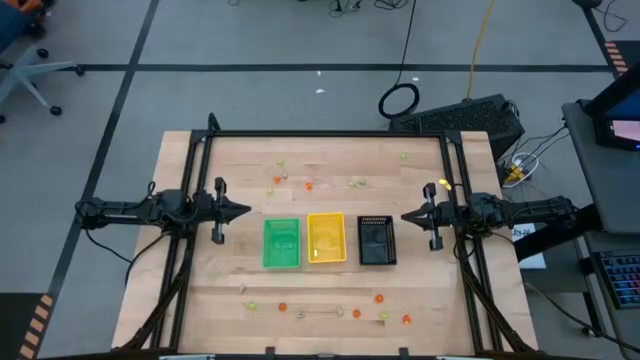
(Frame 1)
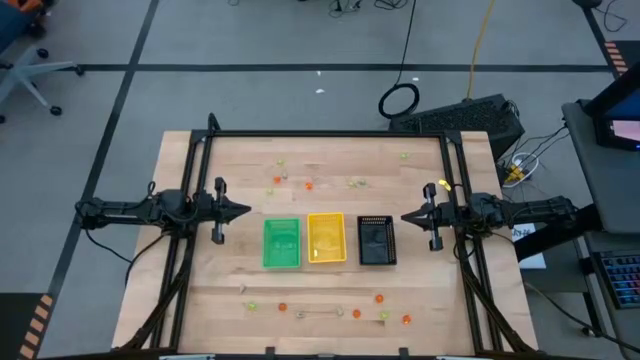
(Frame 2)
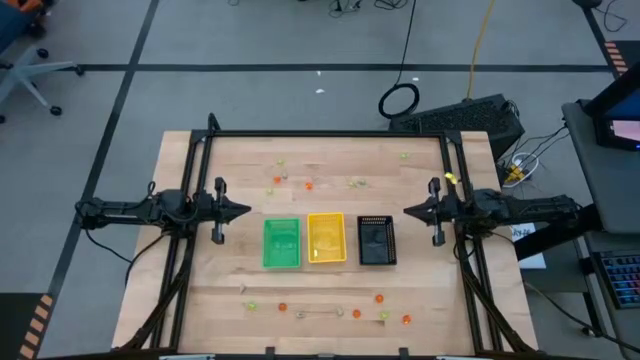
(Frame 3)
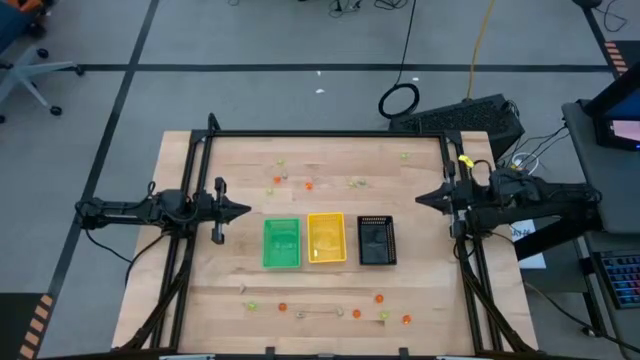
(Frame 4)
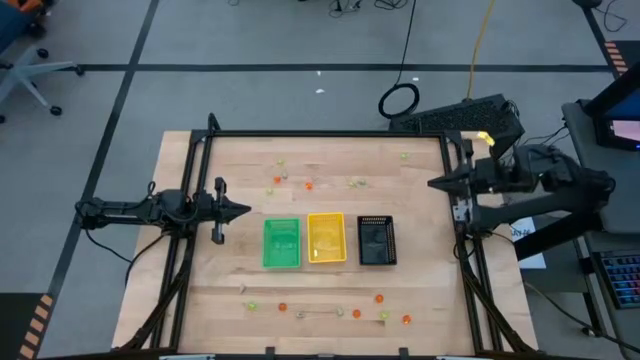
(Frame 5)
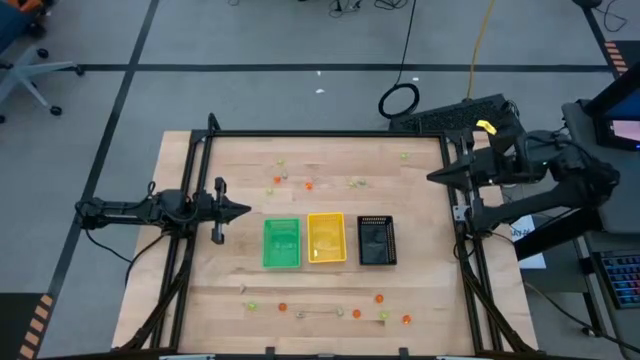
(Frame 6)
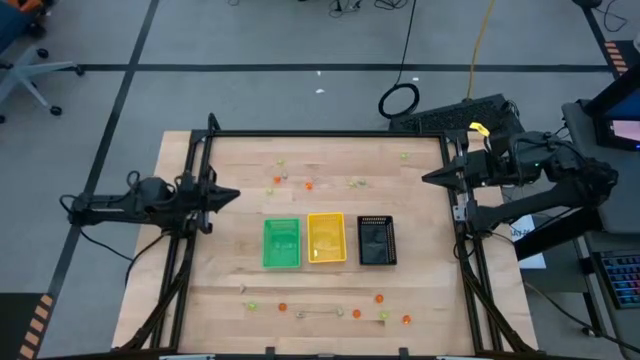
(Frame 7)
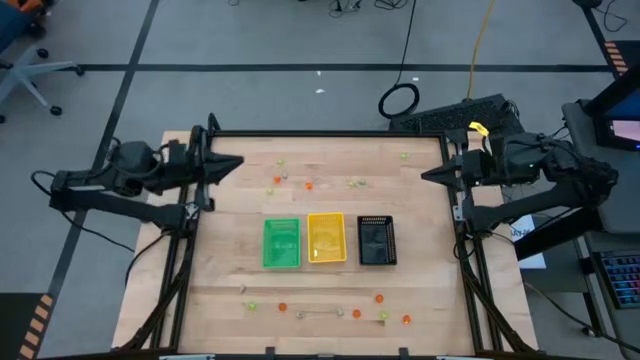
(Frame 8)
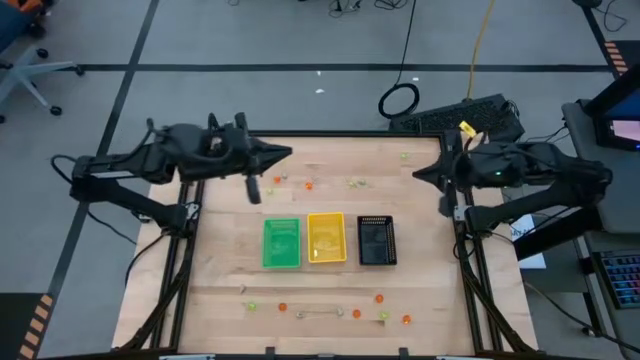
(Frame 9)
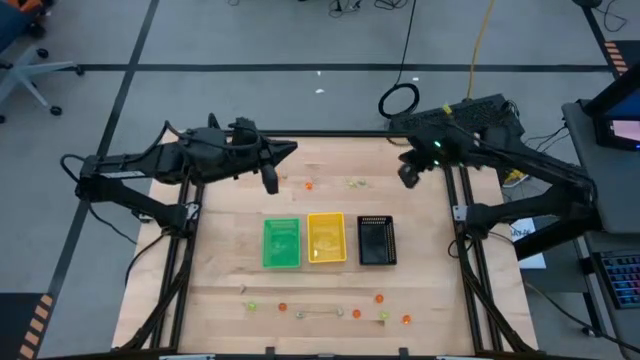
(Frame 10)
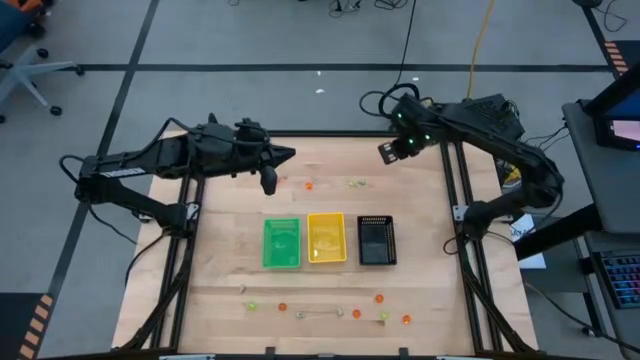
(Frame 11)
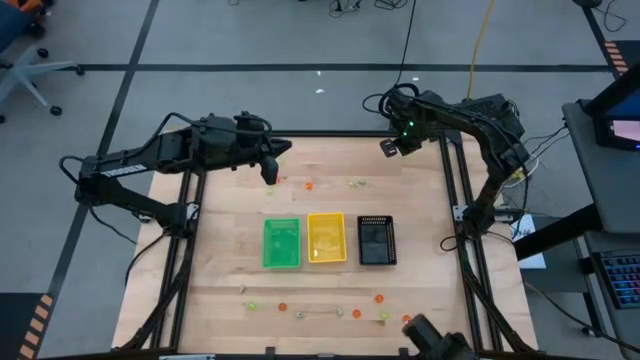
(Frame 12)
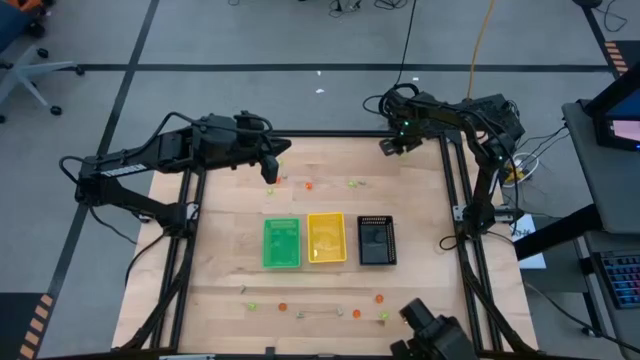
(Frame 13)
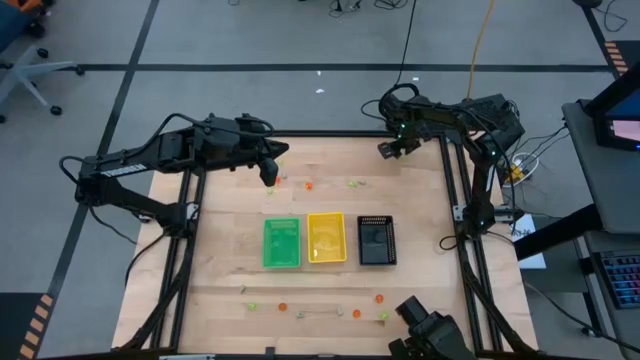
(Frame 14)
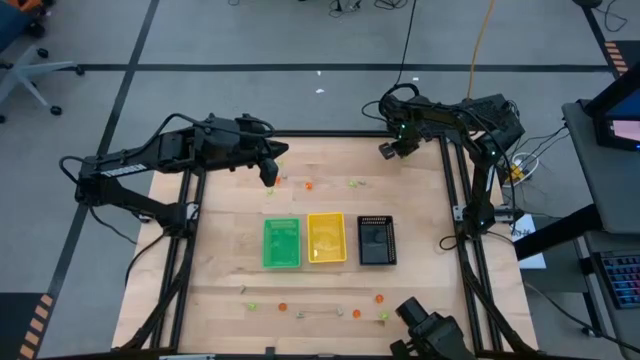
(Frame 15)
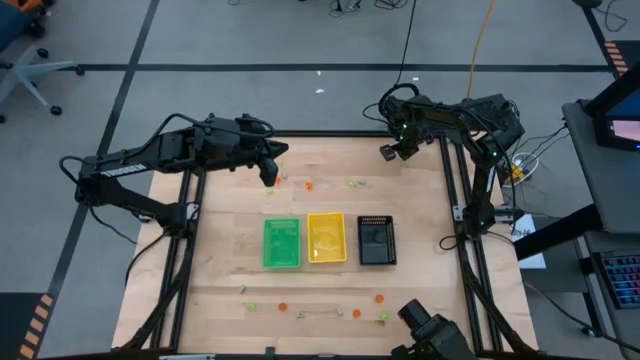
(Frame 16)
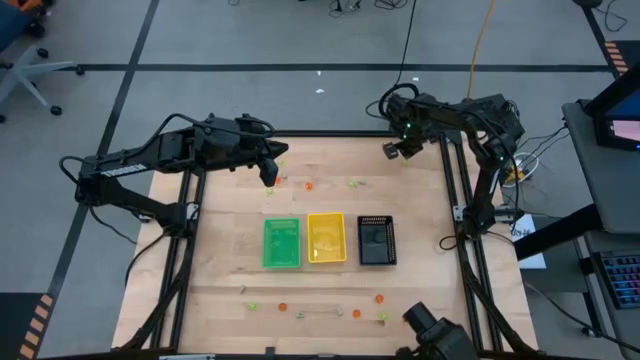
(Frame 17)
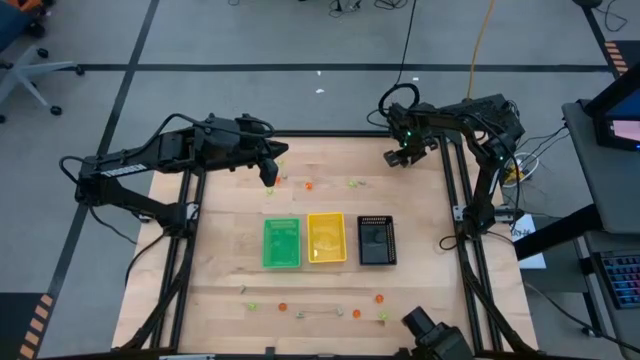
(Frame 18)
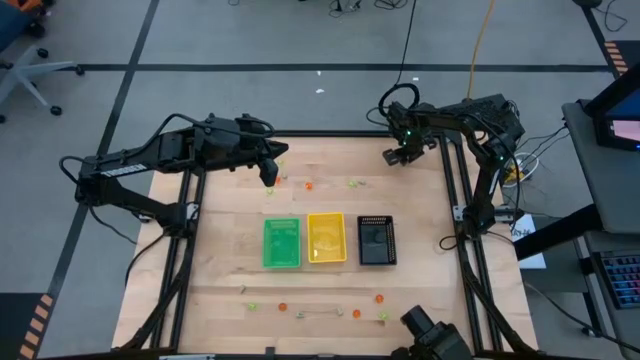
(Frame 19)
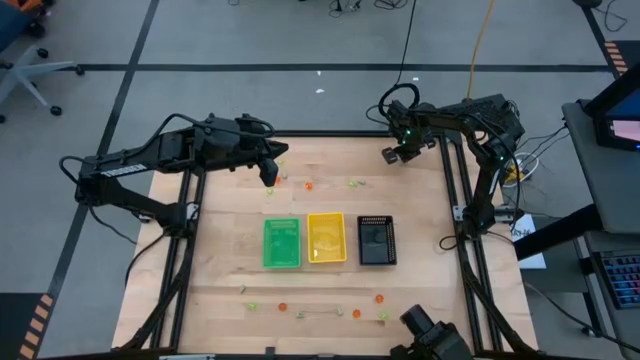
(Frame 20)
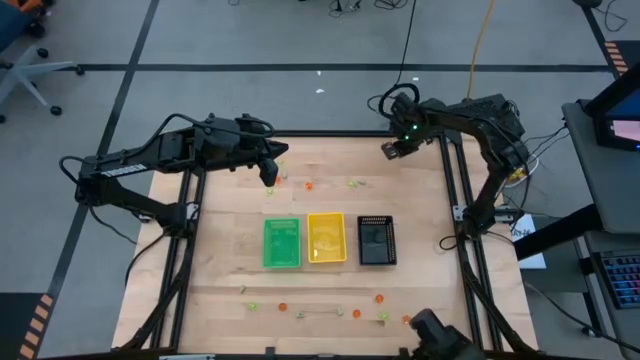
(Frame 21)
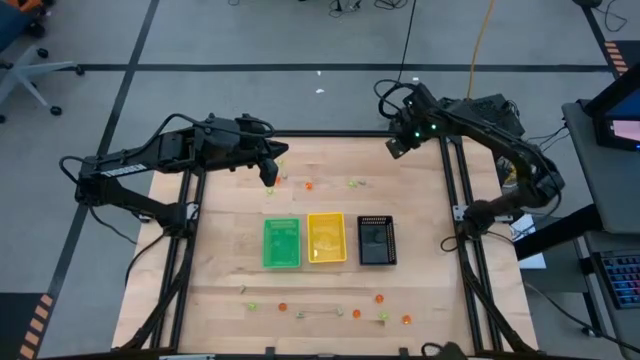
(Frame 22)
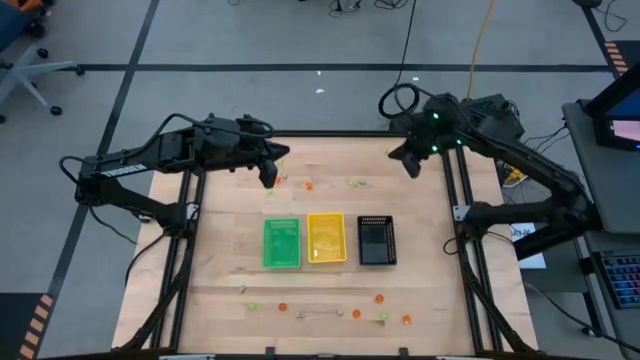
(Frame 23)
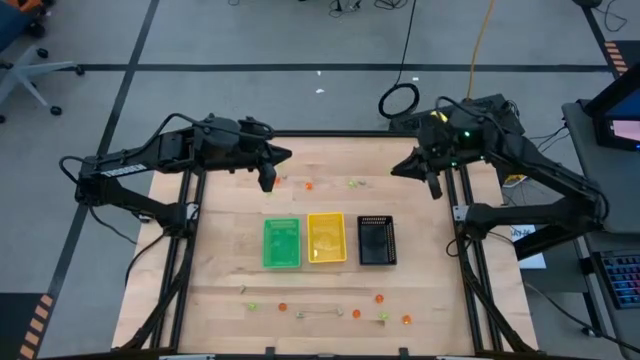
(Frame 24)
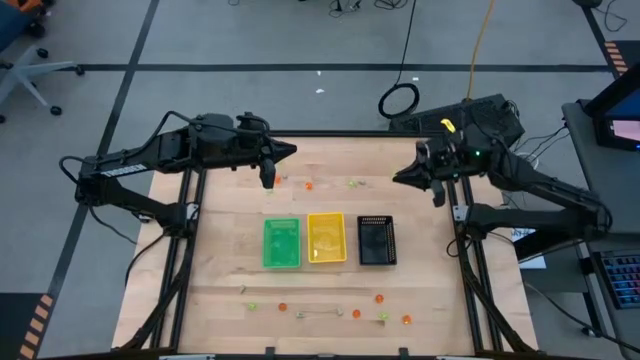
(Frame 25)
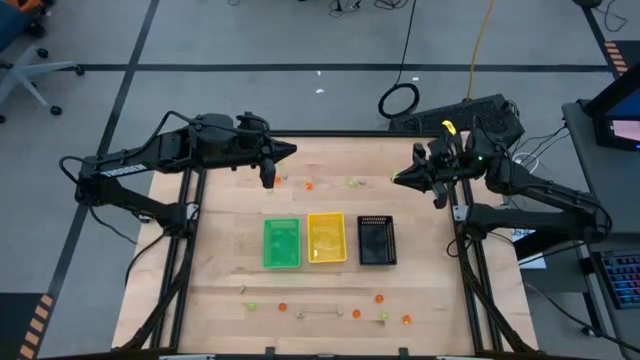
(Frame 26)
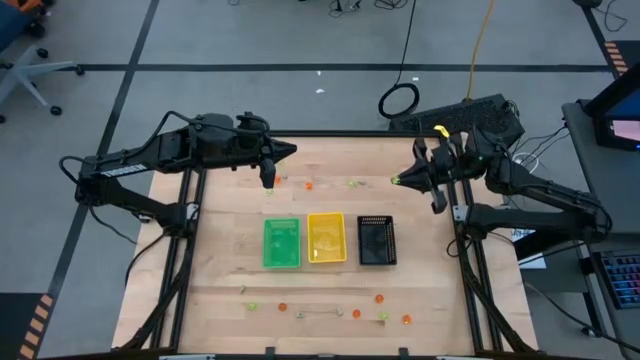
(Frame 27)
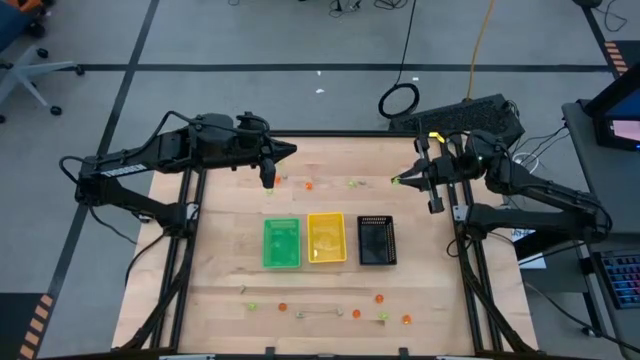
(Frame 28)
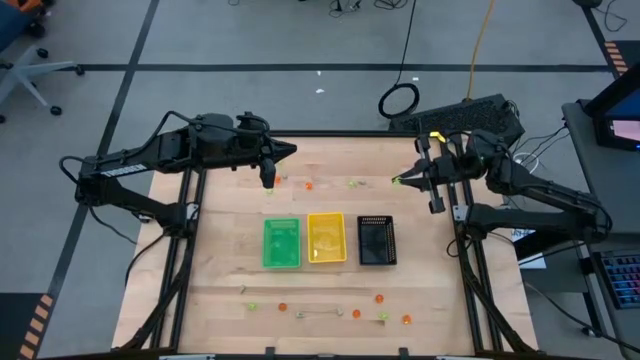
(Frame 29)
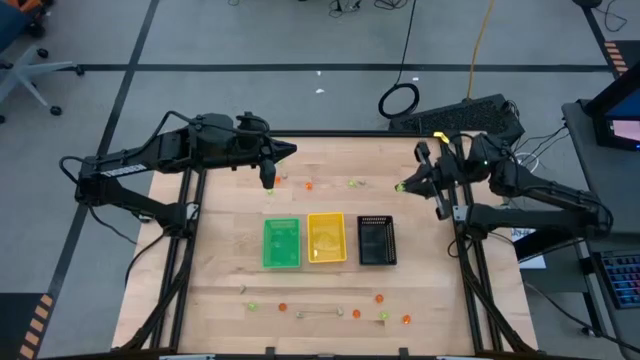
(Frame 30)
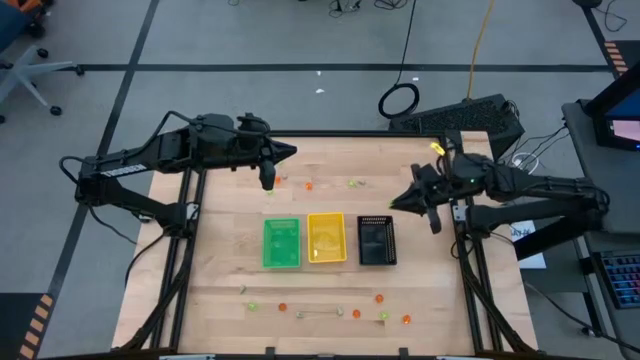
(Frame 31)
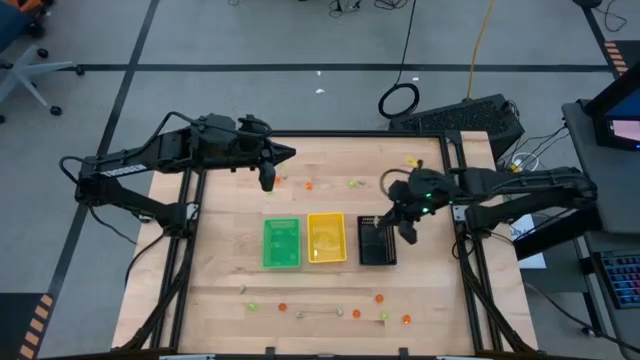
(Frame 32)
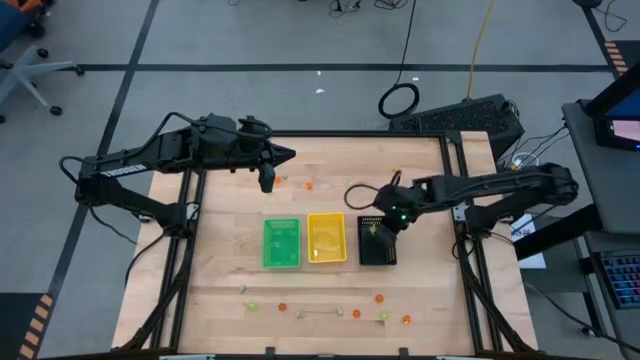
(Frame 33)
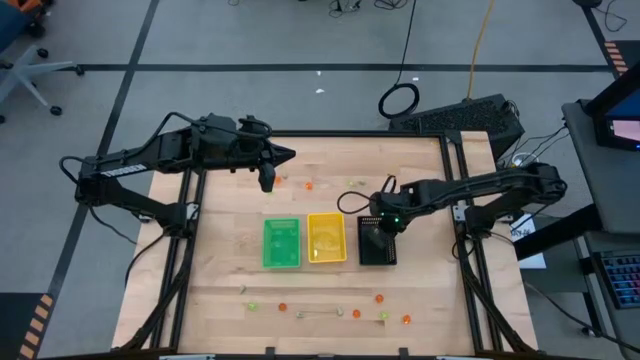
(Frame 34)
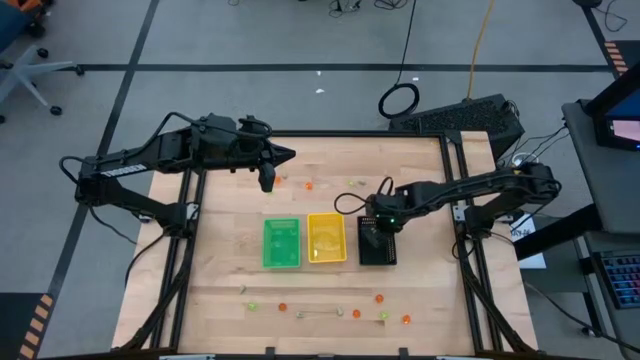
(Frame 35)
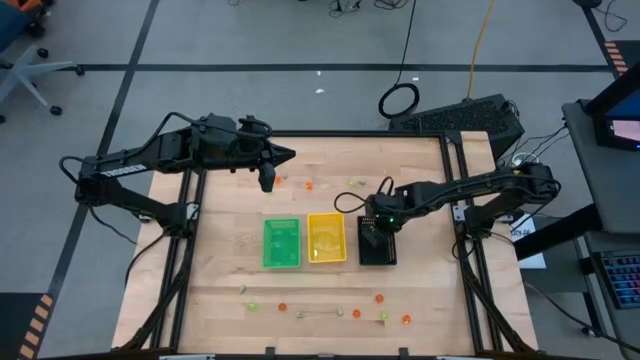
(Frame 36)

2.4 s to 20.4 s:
Task: Sort Halloween decoration
Put the green spider toy into the black basket
